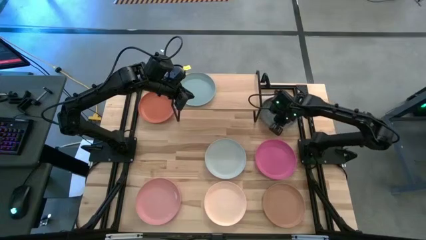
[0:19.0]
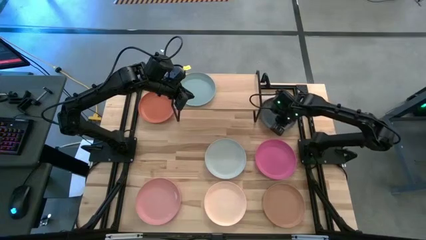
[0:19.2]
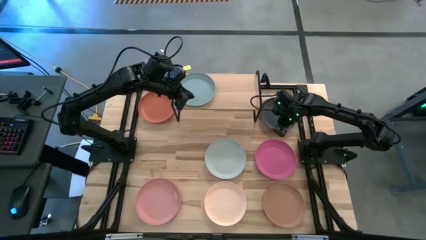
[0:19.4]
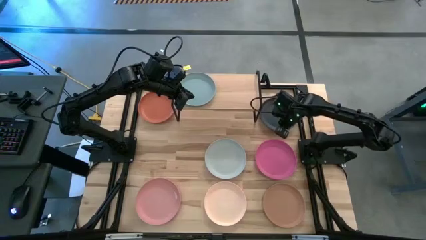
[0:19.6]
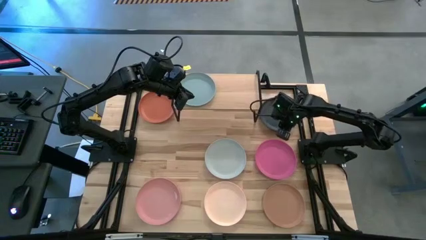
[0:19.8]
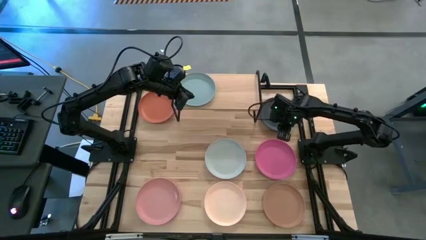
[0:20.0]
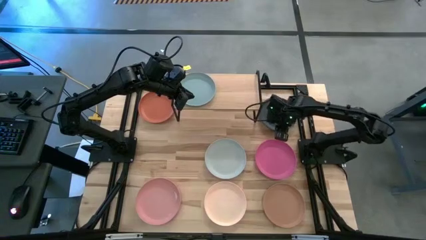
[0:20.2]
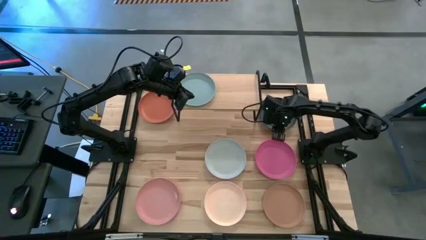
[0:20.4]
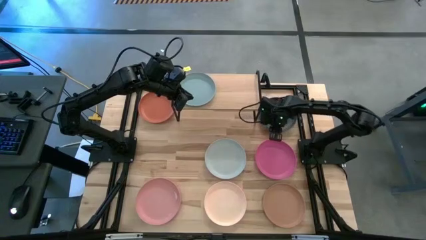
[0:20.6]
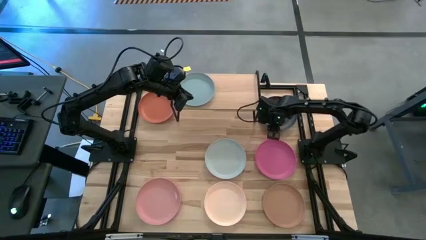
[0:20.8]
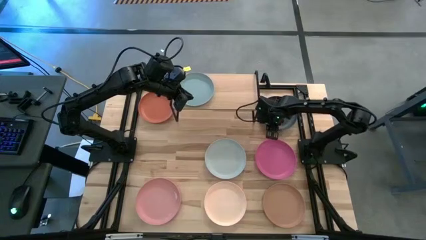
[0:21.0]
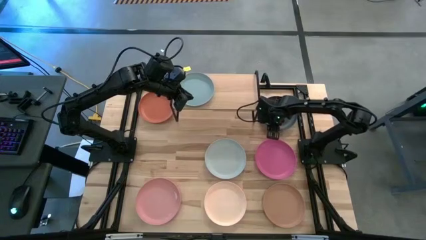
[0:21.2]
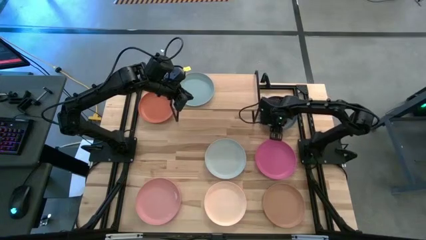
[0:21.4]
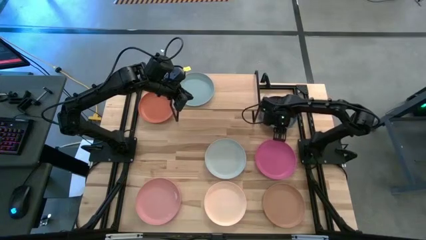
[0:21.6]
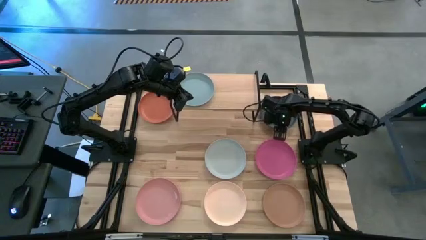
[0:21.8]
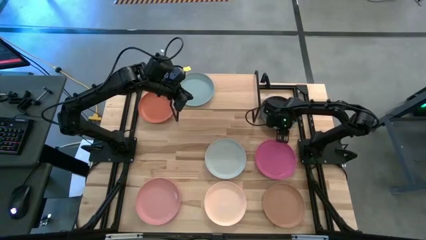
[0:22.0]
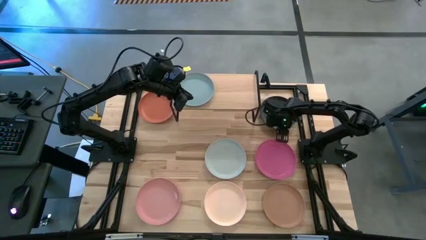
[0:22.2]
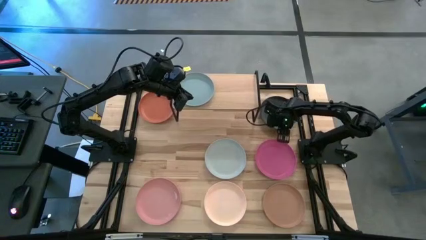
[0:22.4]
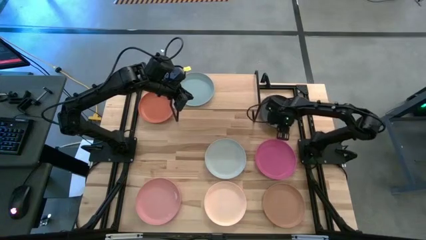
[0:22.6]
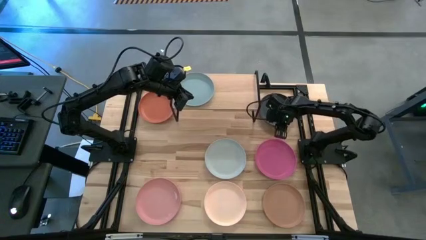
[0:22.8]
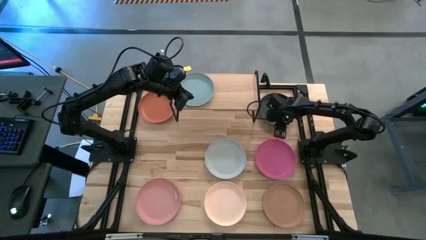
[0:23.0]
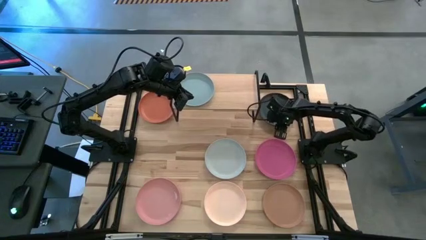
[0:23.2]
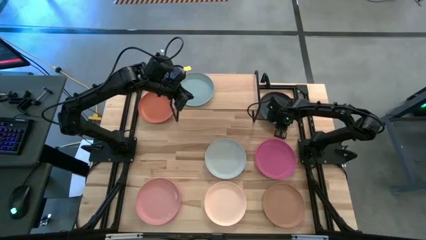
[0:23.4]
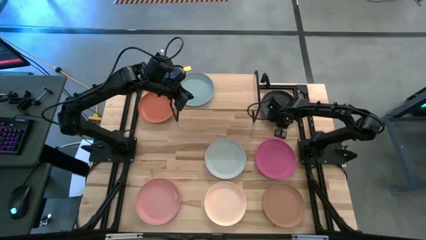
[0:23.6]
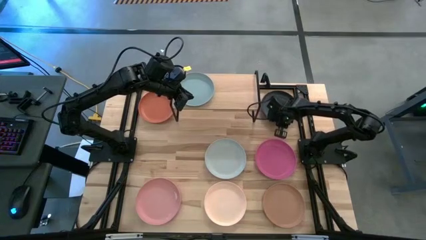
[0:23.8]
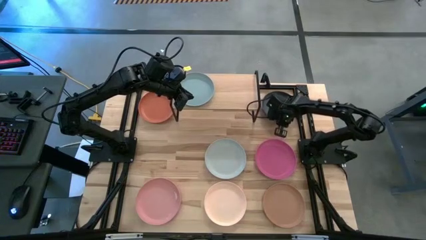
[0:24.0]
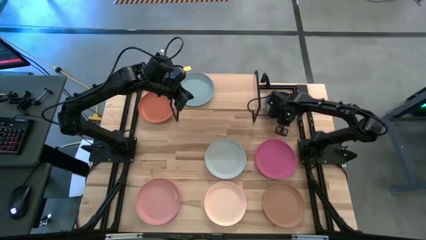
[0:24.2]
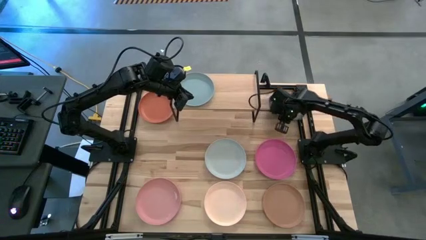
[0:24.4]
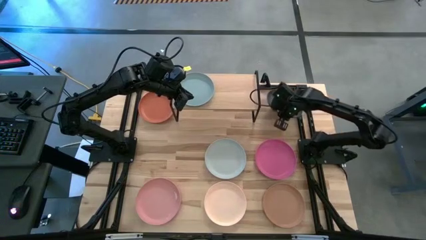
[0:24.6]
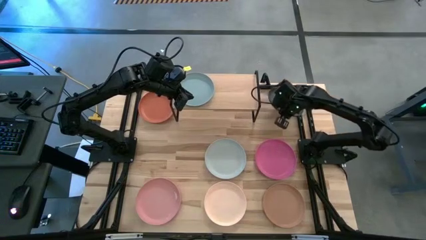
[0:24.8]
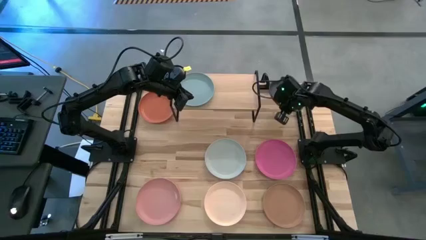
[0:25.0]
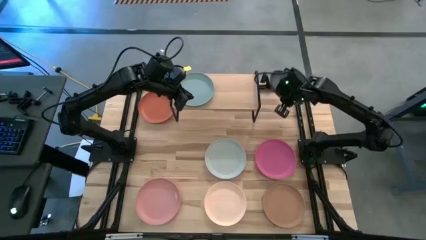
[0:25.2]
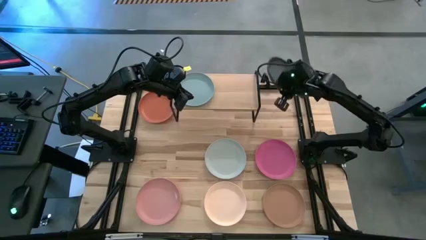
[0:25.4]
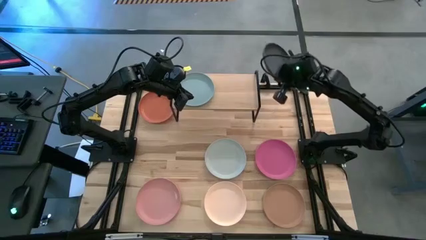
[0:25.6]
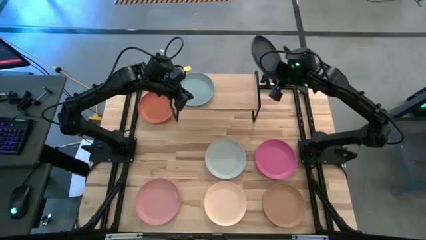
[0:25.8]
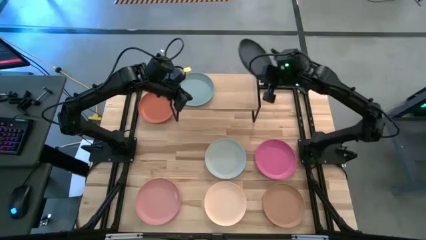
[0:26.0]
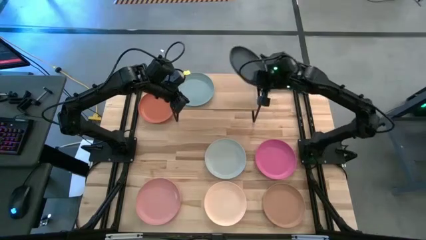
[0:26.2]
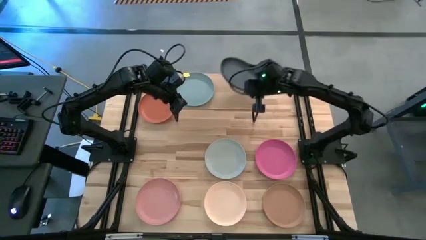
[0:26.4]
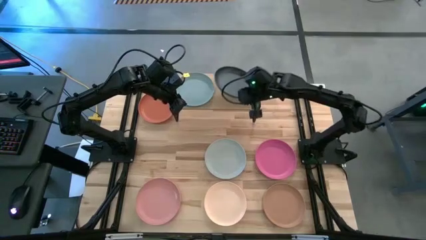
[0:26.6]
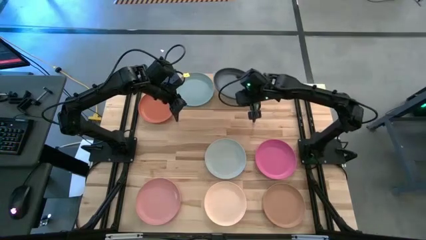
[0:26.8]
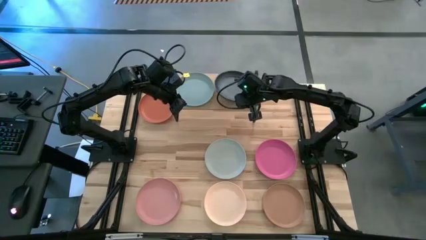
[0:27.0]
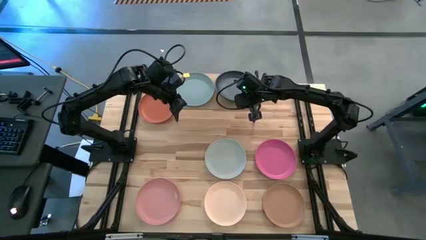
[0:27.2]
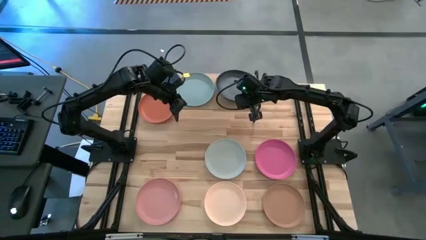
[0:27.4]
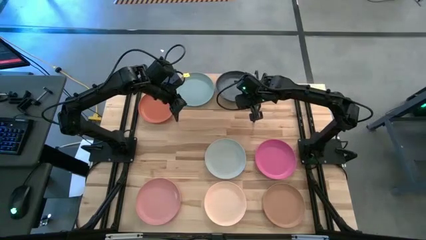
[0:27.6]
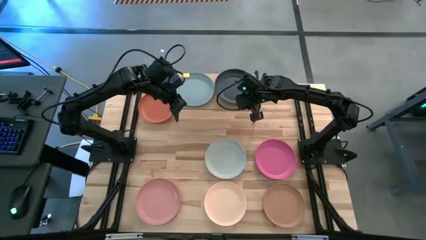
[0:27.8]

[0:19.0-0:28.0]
Task: Place and stack plates onto a shelf
Put the dark green plate on the shelf

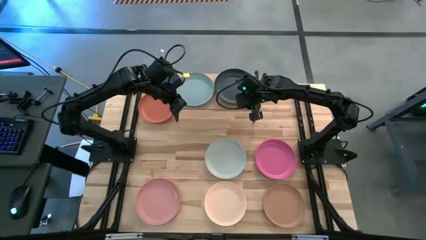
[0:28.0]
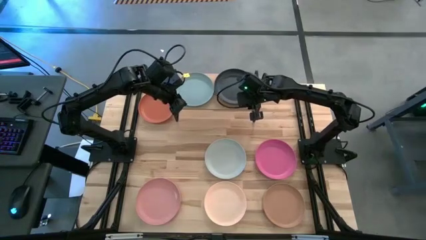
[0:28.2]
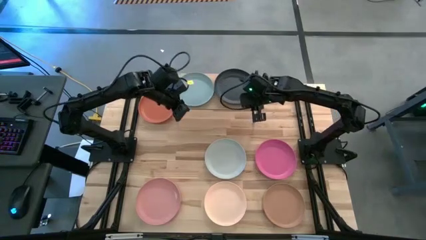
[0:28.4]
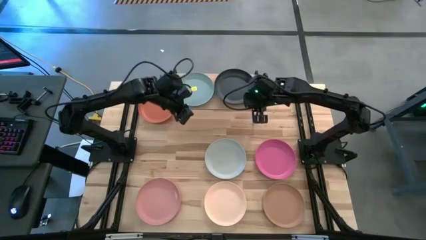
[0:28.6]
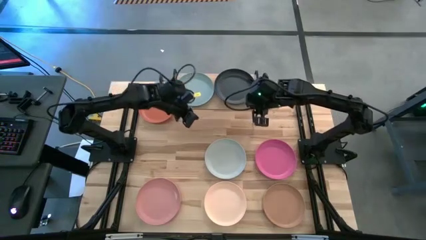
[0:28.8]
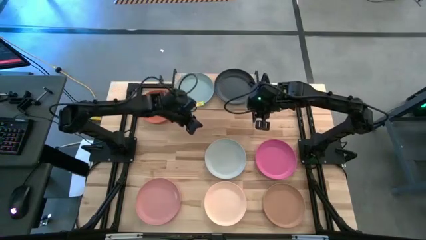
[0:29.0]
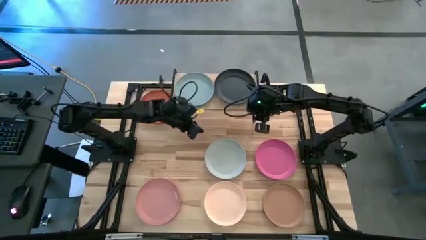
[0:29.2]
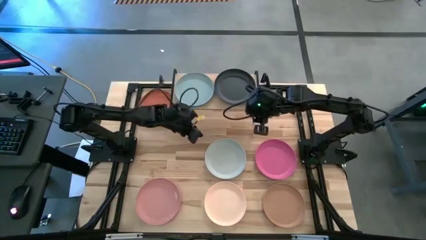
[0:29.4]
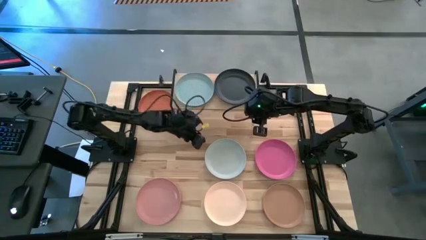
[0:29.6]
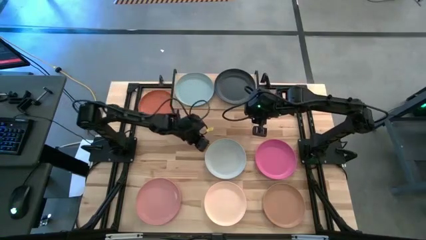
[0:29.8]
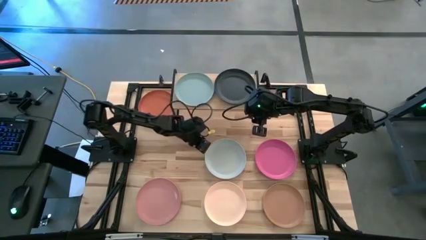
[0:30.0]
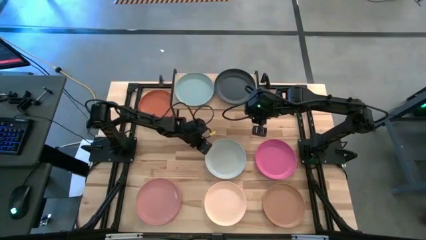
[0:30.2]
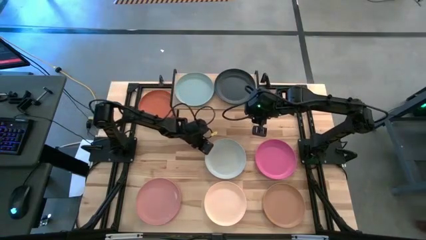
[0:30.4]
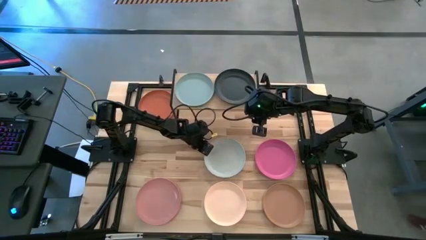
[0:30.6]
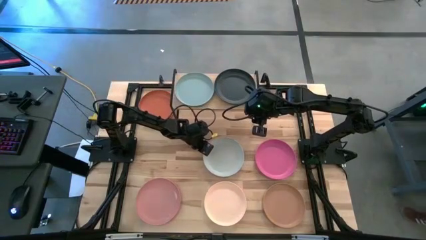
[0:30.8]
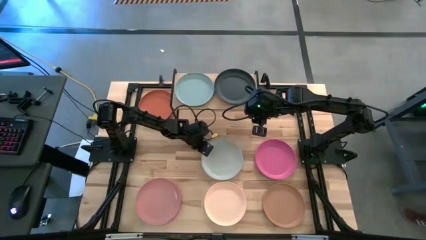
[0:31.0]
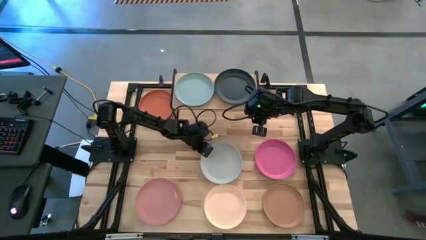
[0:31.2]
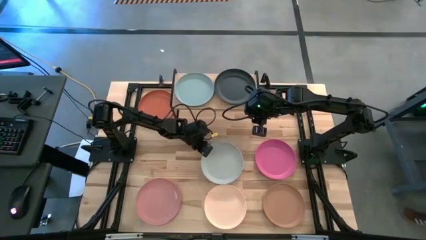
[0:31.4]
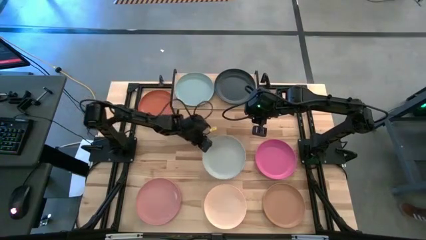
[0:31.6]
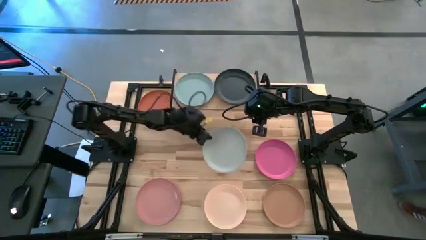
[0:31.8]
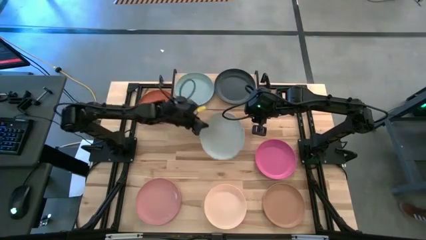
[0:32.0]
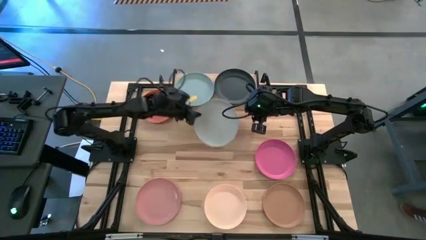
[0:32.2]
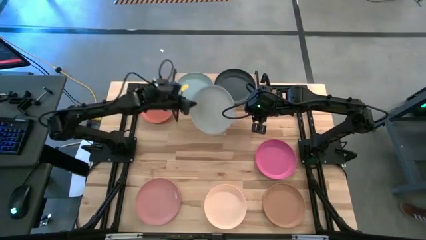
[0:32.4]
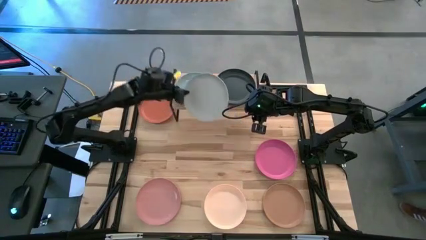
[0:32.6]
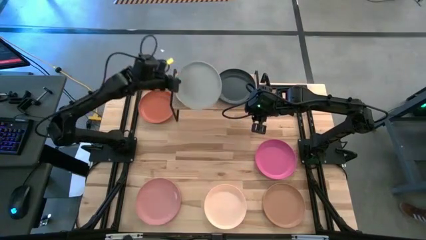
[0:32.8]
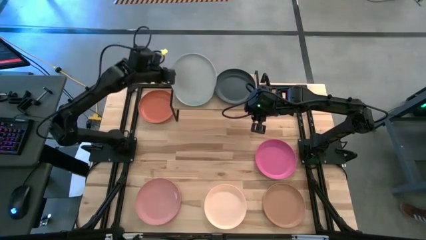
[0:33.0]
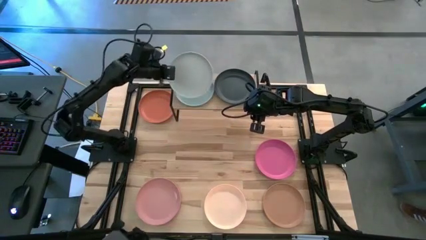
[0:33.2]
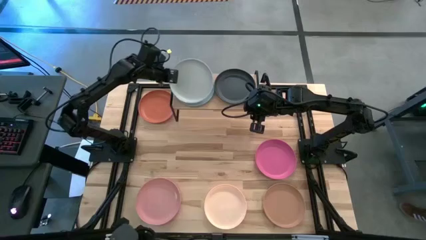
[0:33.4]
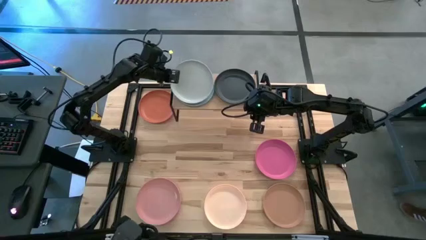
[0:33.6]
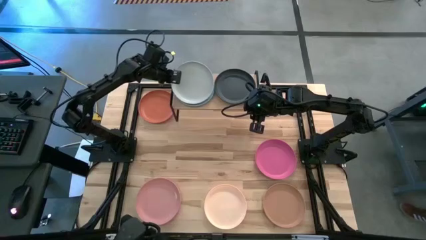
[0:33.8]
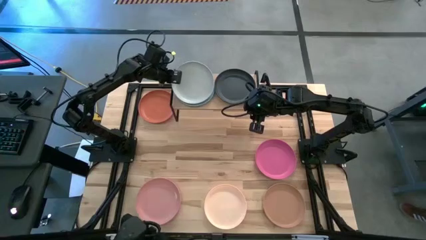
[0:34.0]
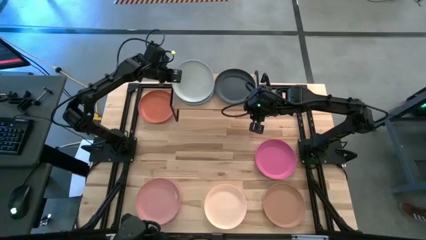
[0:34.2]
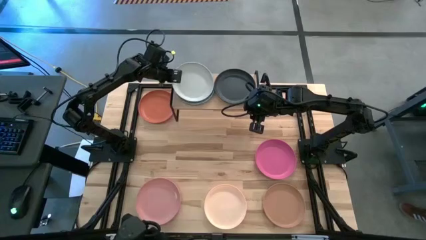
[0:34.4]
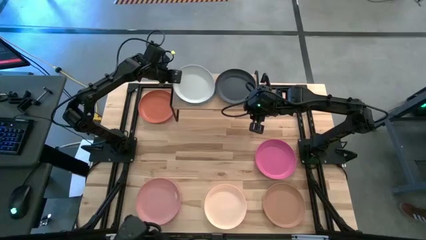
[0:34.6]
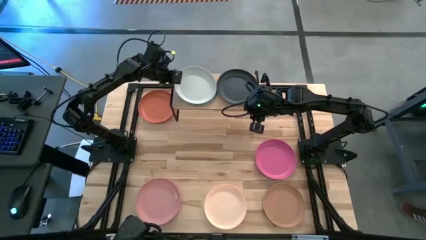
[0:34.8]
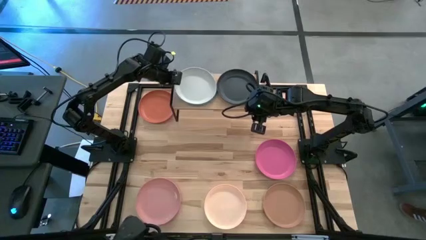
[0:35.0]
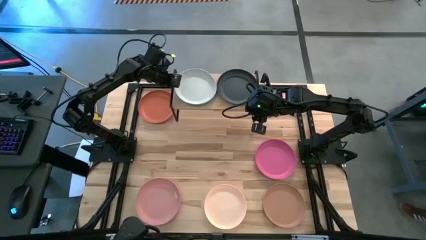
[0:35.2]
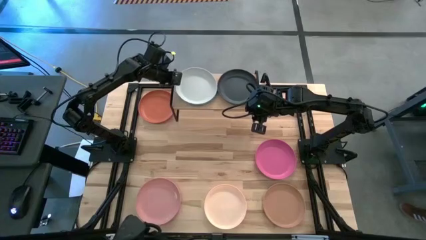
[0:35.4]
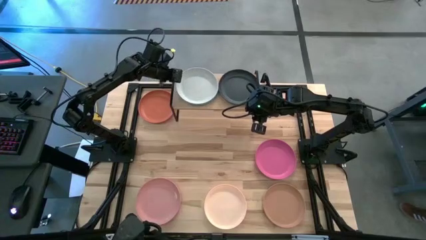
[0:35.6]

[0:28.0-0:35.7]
Stack the white plate on top of the gray plate on the shelf
